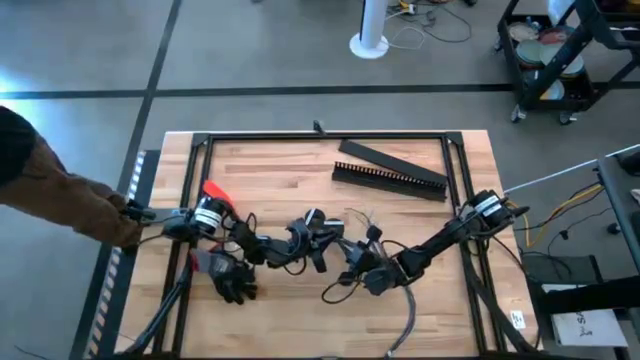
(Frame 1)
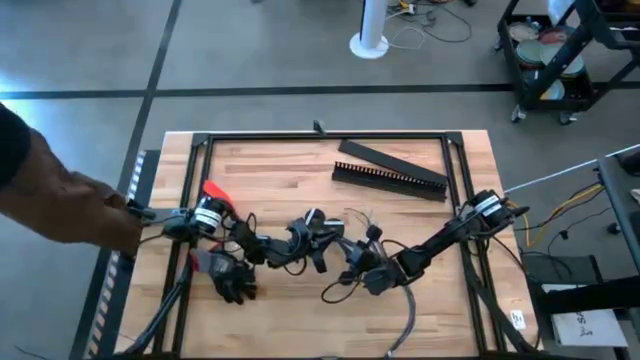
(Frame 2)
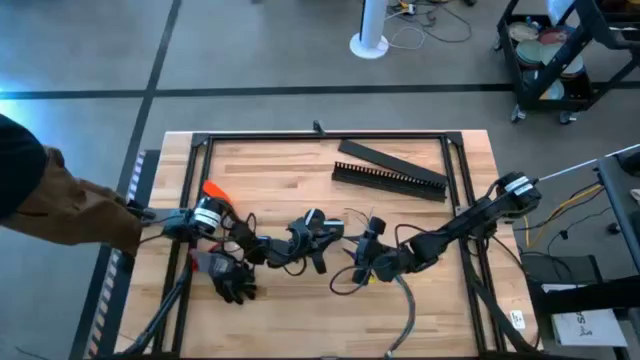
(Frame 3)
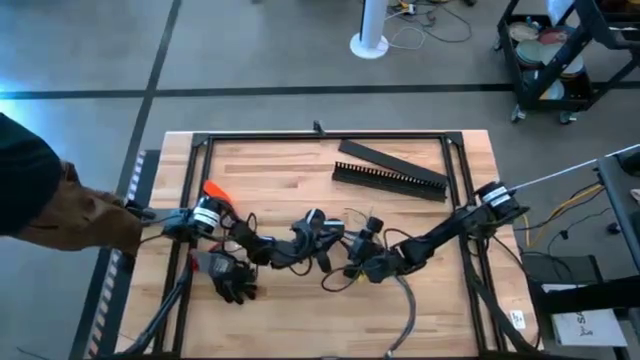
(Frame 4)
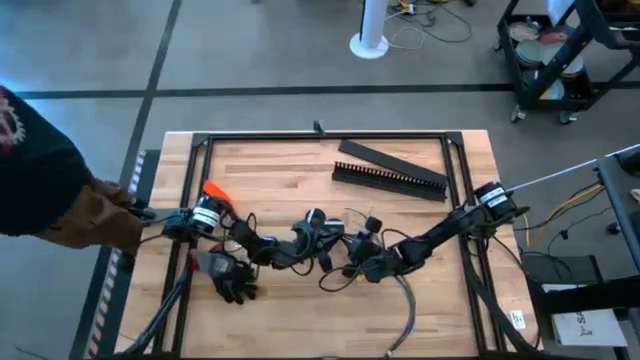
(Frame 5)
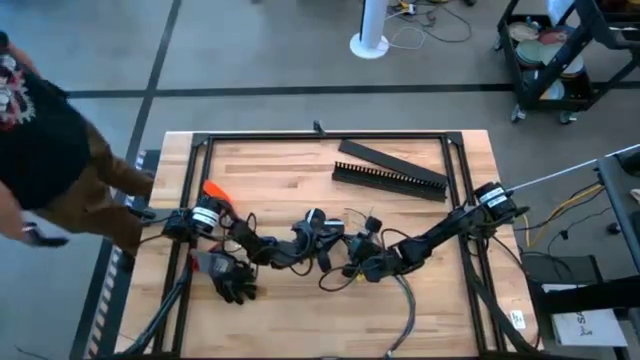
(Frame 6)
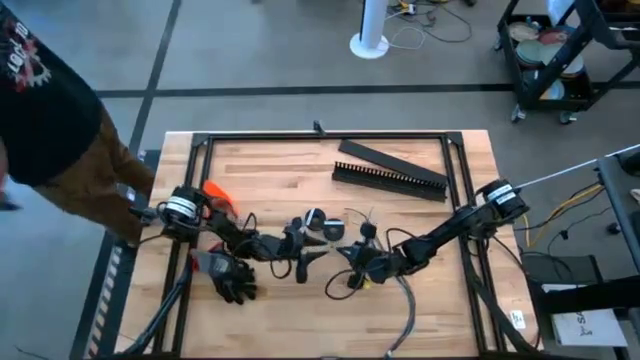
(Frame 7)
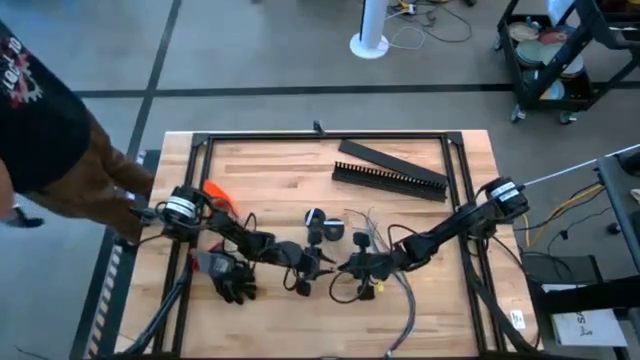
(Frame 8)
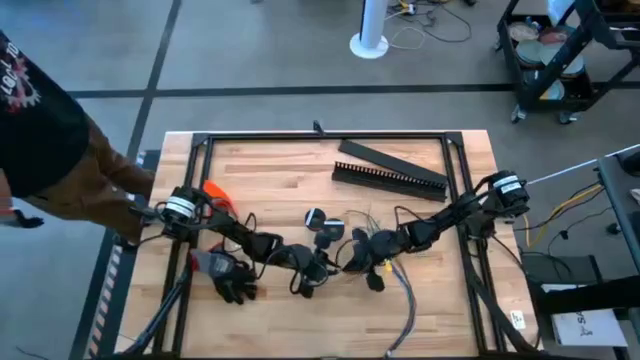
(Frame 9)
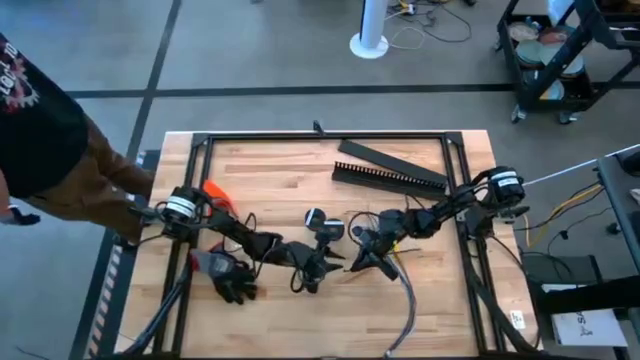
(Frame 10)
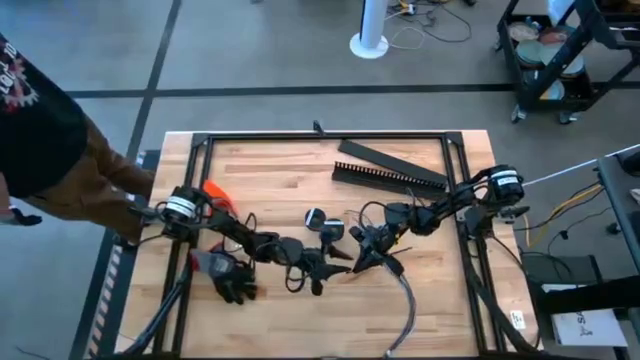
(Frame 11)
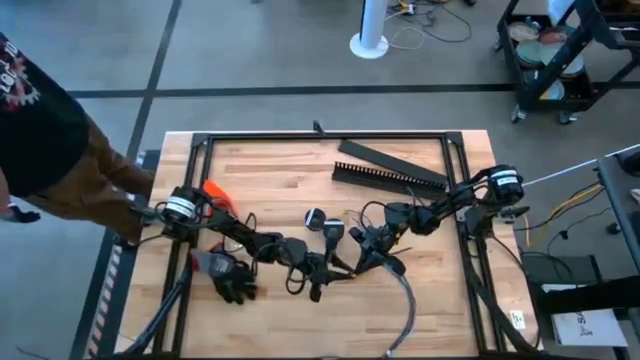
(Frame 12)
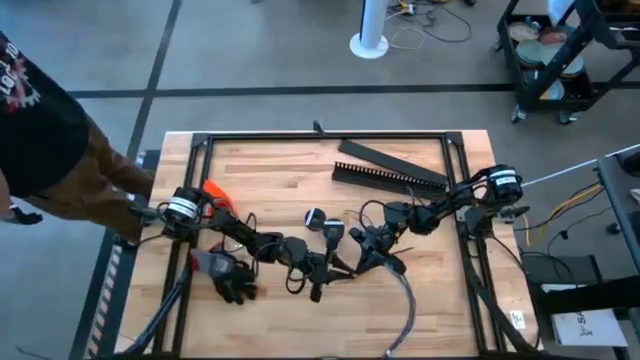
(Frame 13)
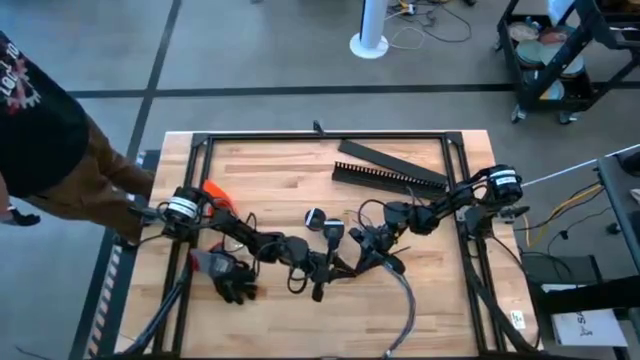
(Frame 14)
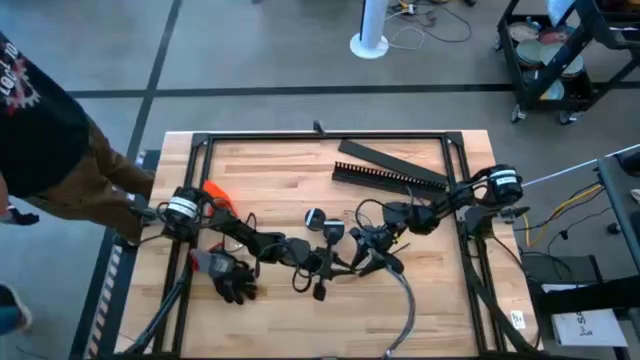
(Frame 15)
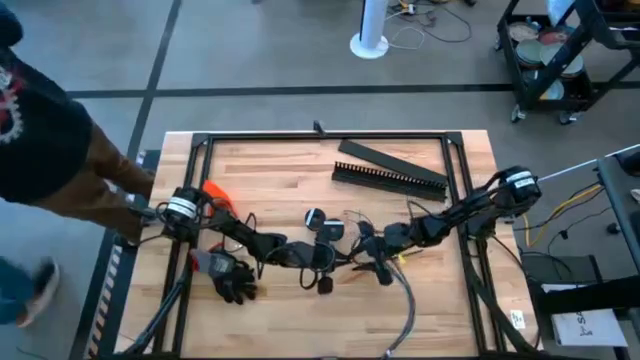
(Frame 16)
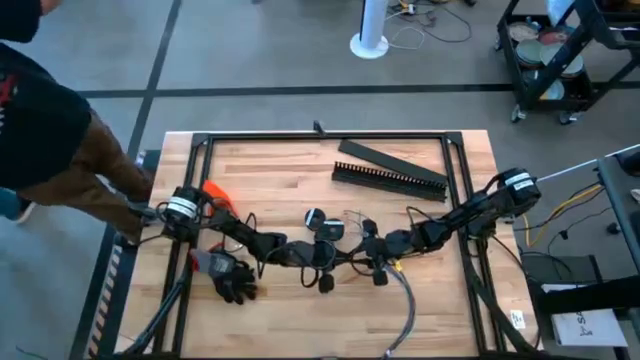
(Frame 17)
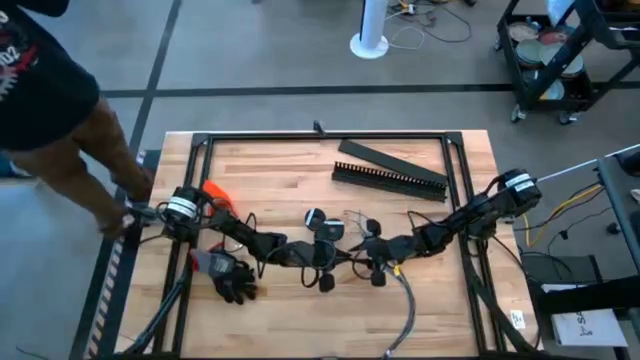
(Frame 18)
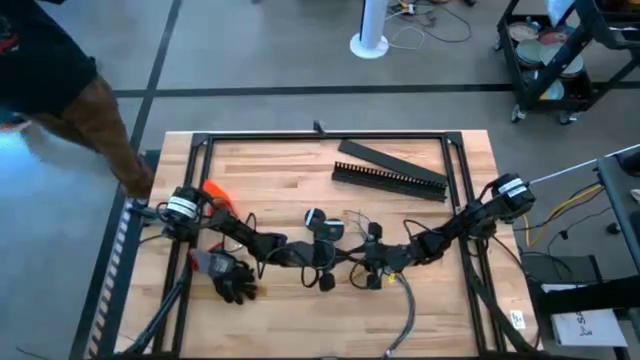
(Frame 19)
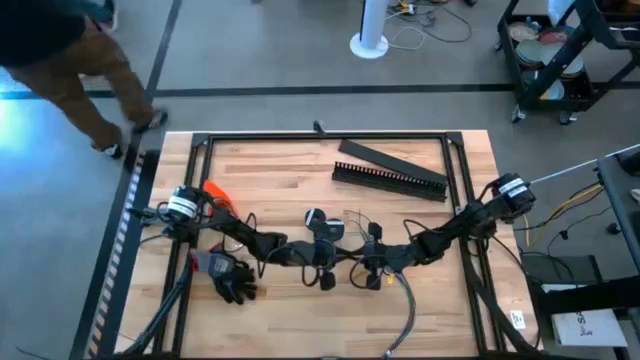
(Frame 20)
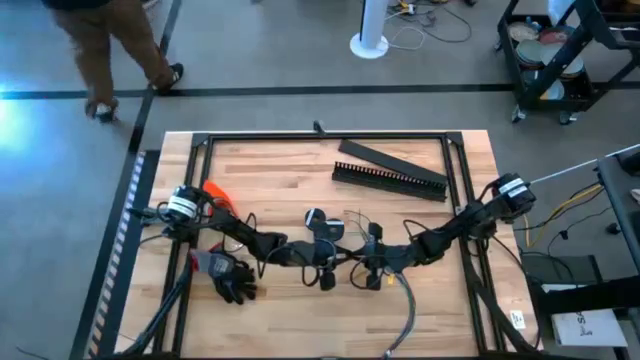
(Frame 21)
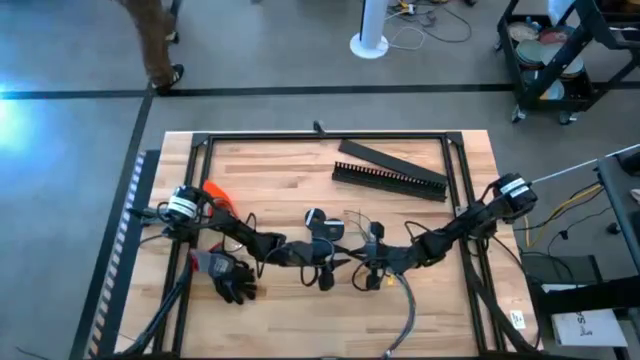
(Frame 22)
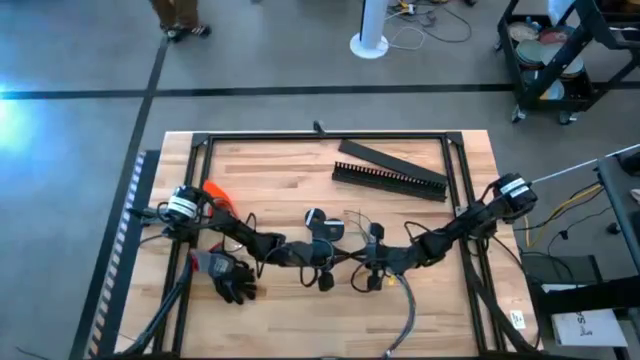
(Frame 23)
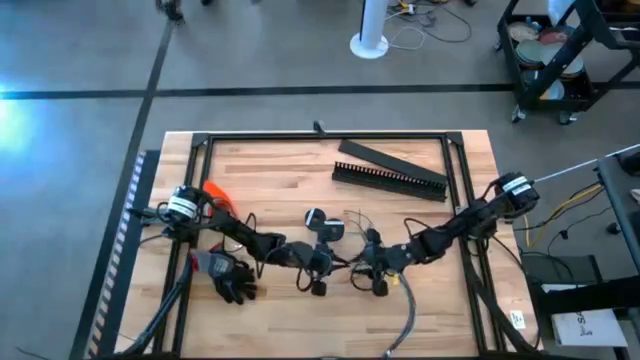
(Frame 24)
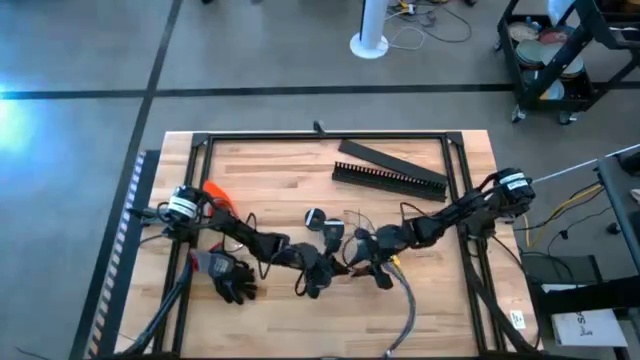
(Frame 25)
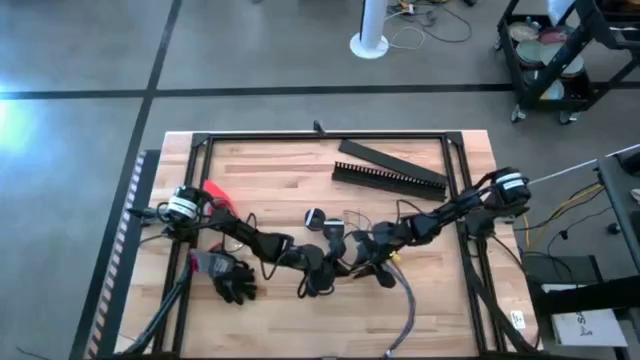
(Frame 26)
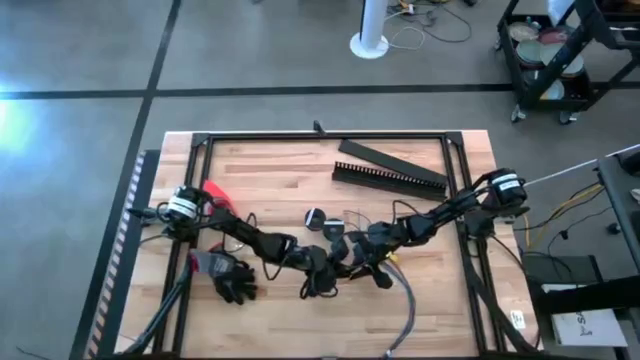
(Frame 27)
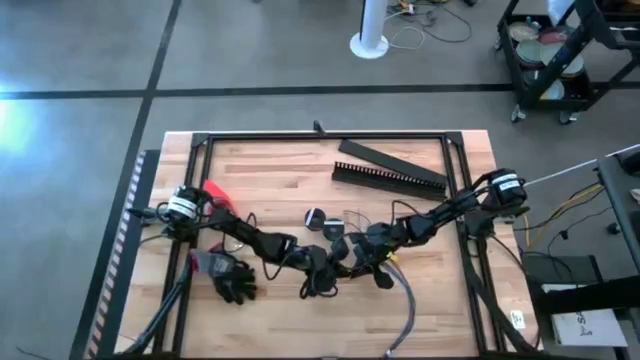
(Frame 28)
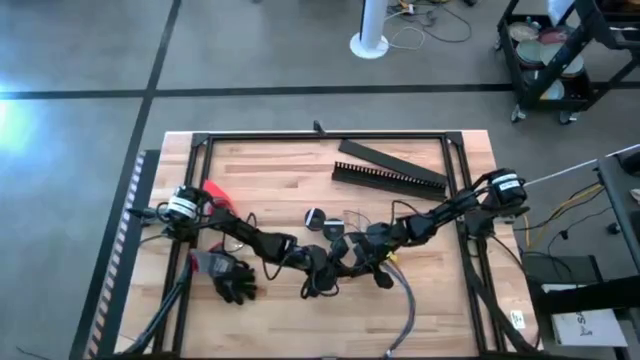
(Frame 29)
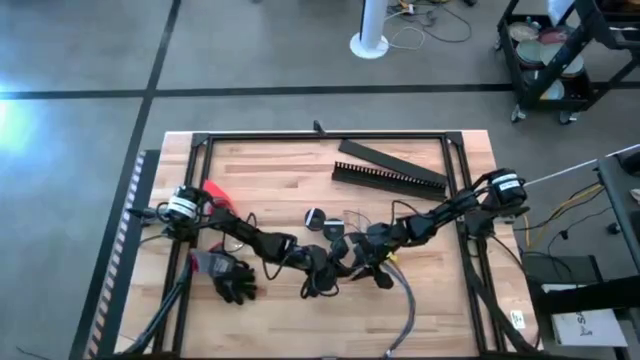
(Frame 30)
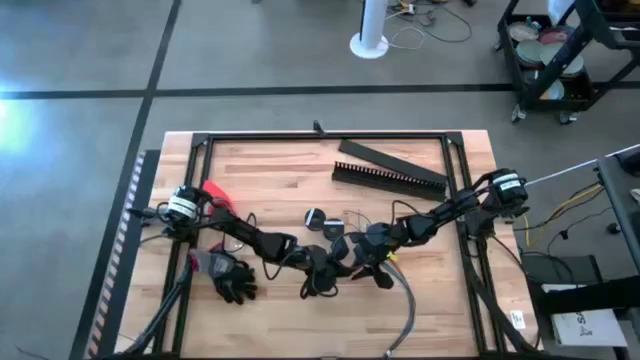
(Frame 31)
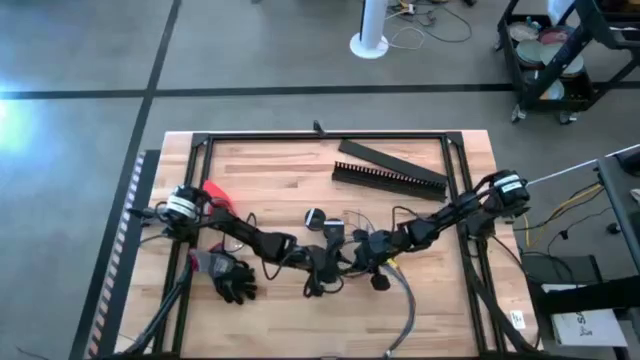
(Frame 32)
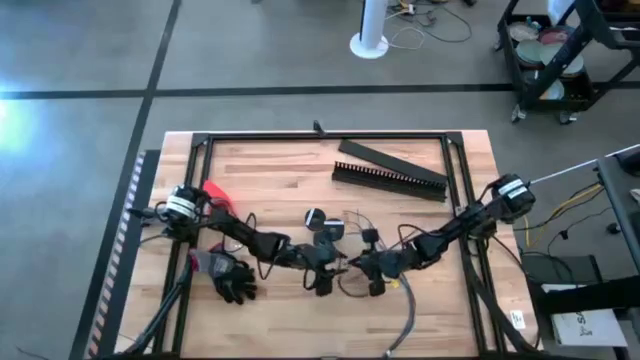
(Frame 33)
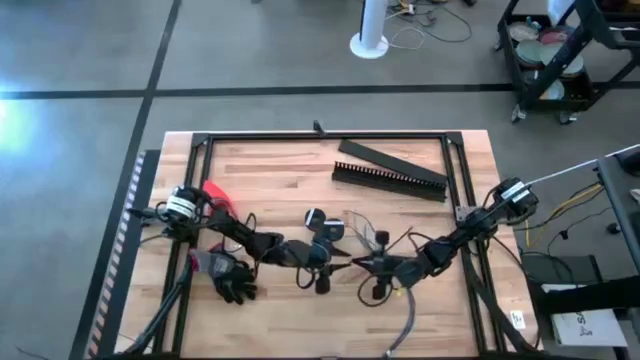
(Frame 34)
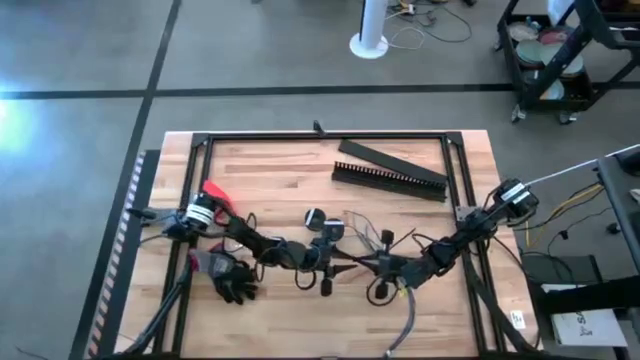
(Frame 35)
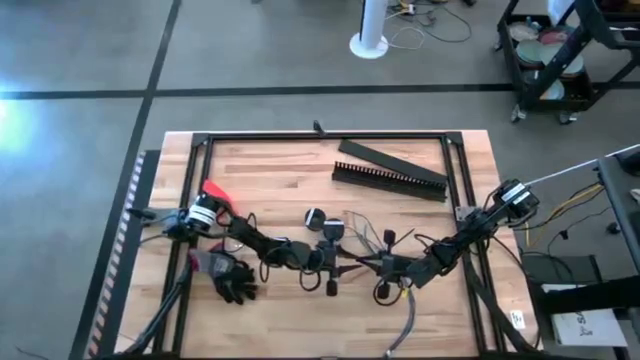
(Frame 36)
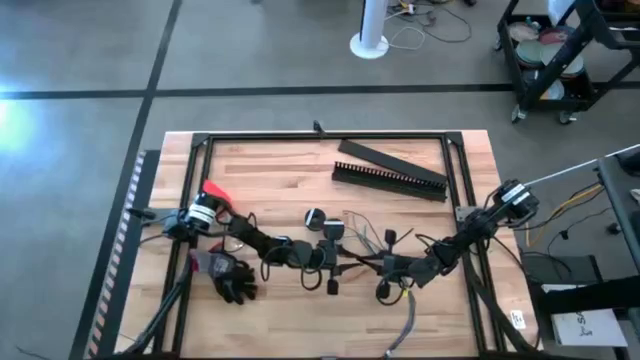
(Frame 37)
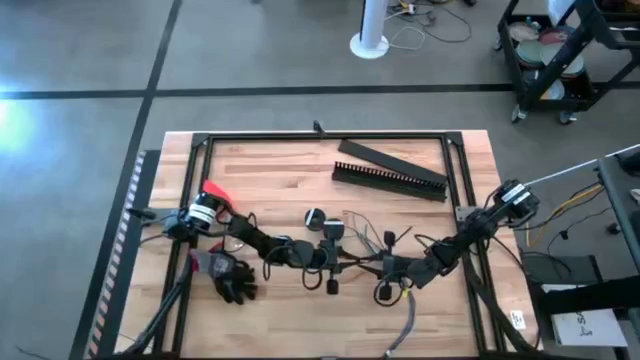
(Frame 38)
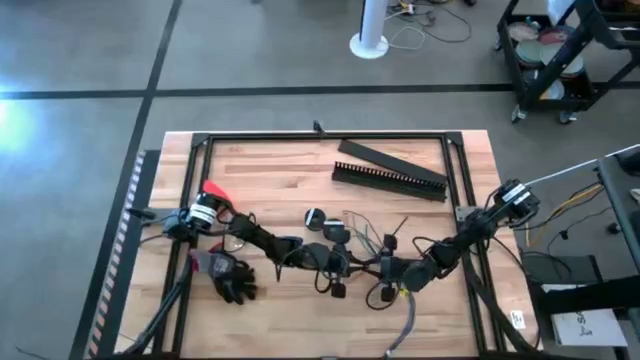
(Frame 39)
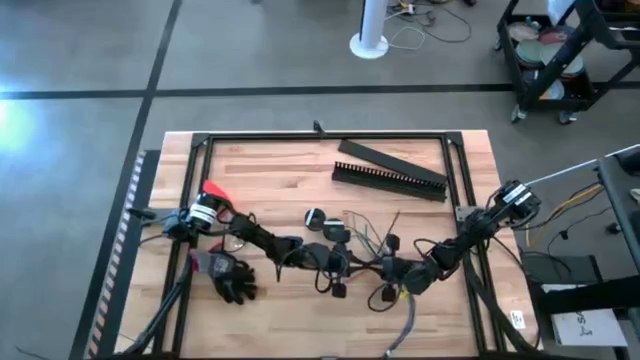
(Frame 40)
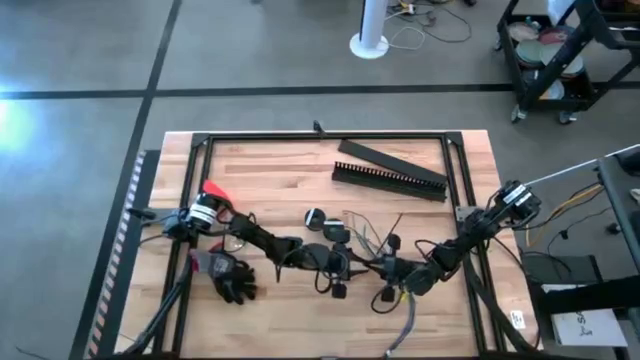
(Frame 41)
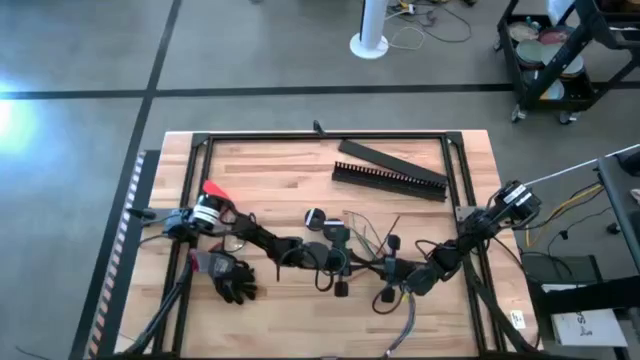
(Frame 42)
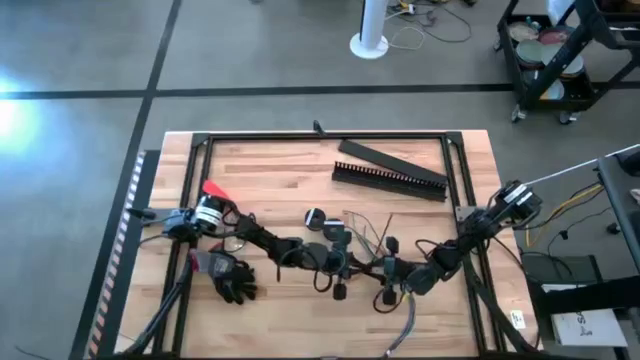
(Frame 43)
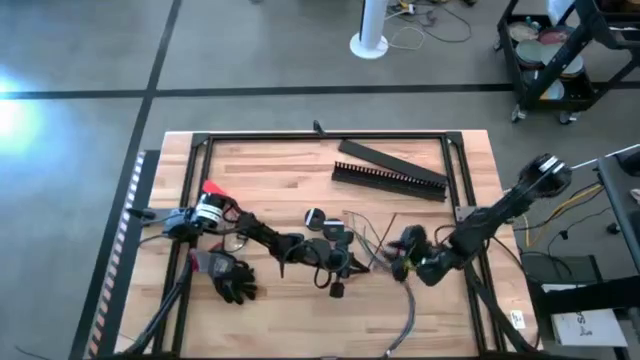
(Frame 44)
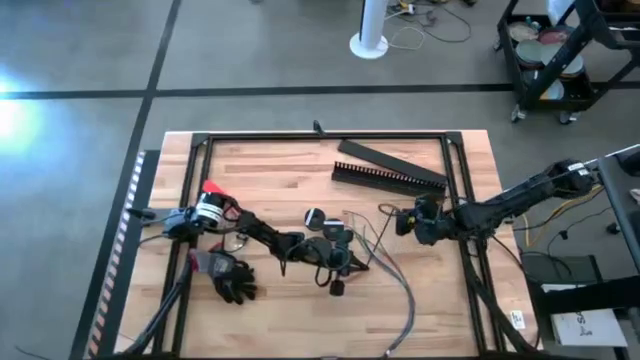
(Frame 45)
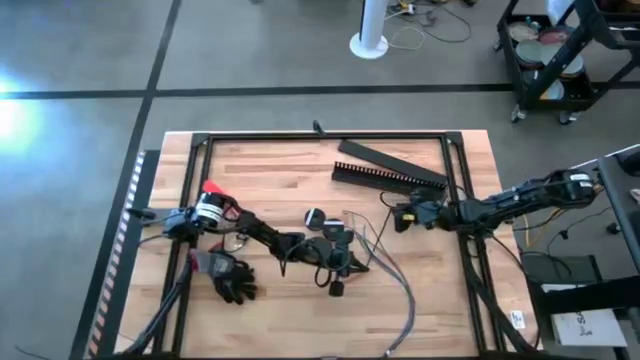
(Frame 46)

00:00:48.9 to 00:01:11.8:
Task: Ziptie cables
Wrap the black zip tie on the cables
